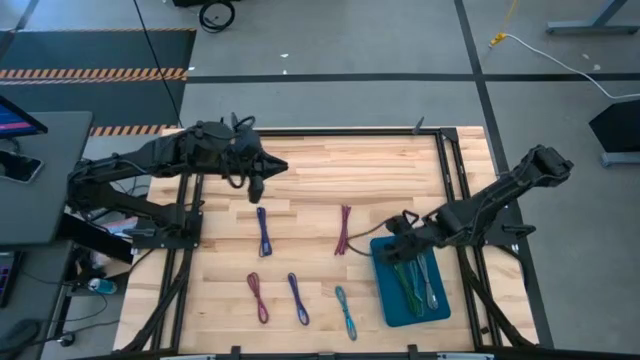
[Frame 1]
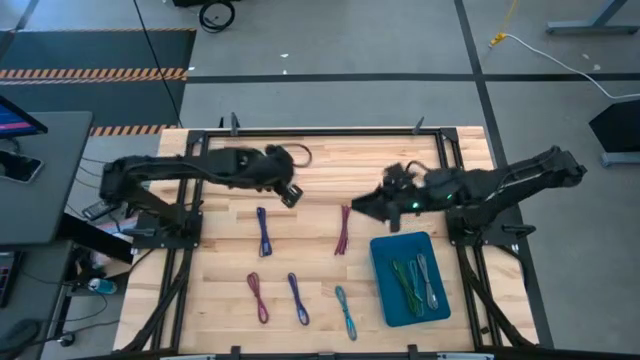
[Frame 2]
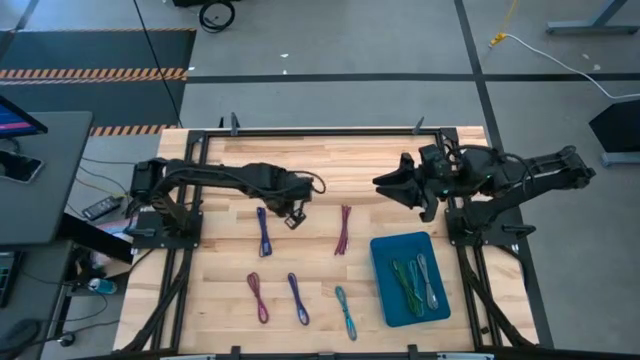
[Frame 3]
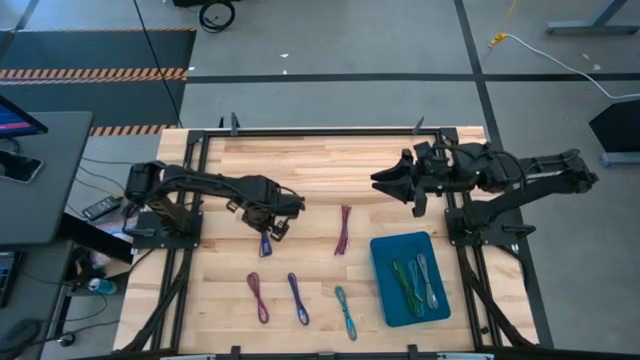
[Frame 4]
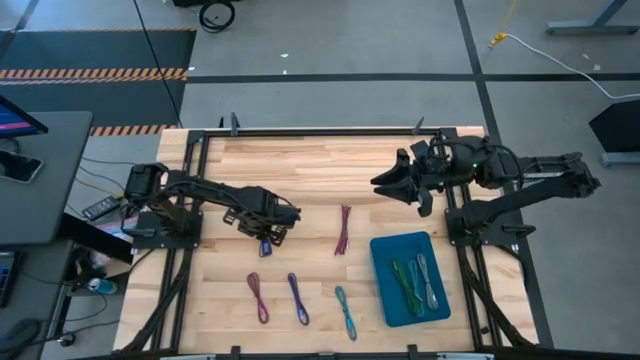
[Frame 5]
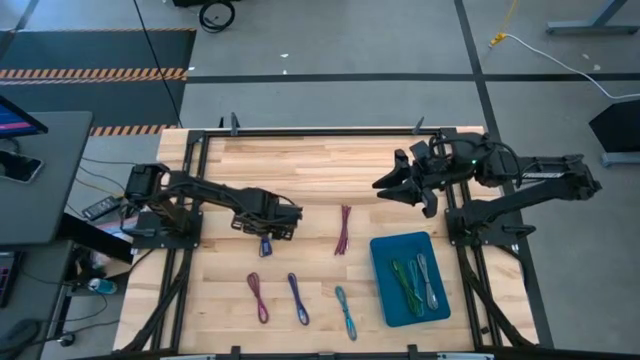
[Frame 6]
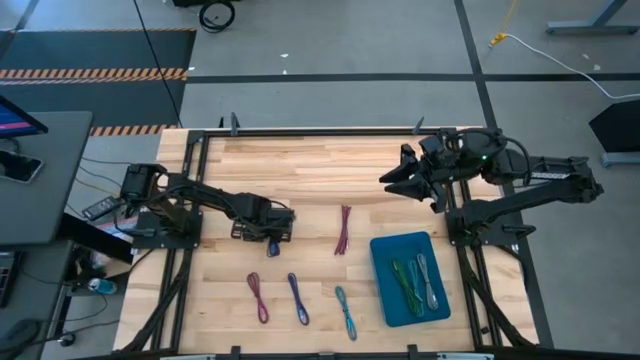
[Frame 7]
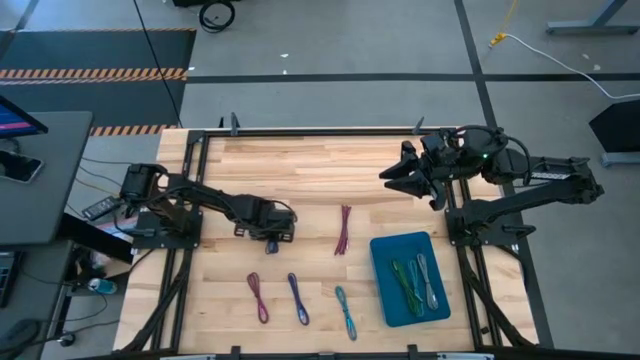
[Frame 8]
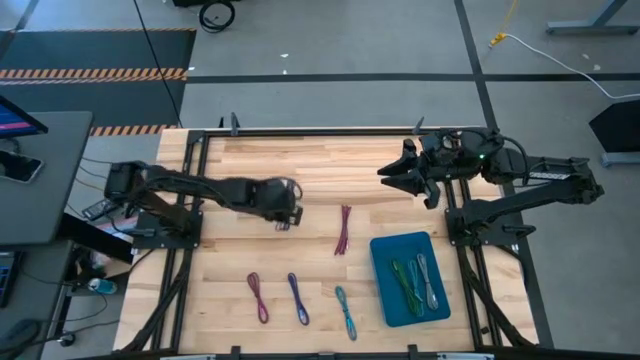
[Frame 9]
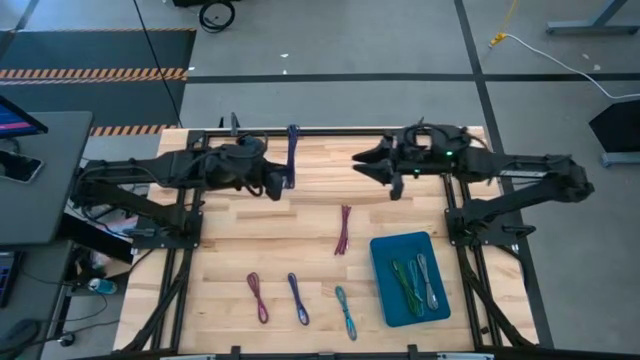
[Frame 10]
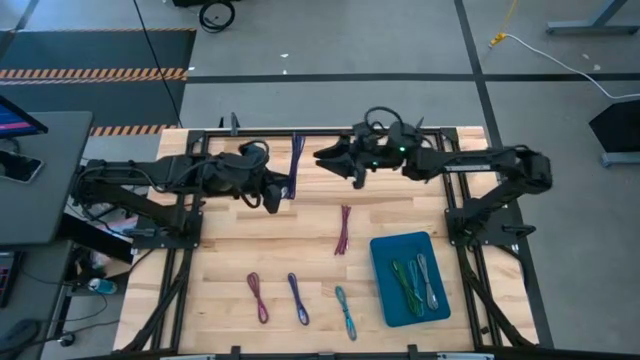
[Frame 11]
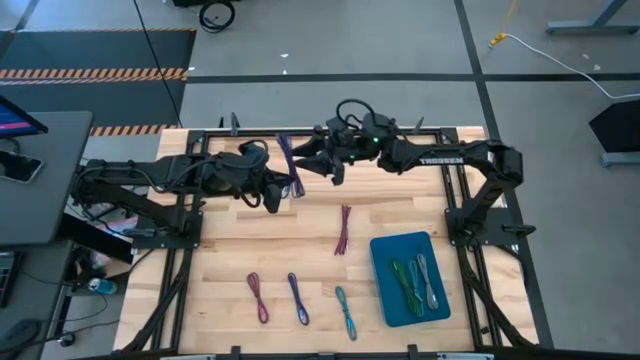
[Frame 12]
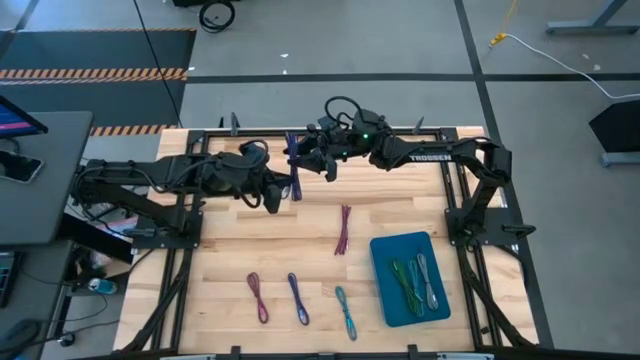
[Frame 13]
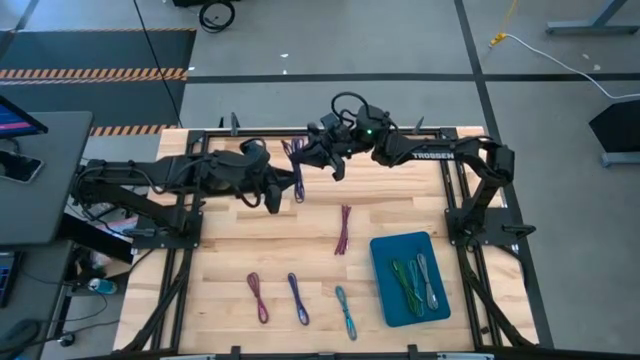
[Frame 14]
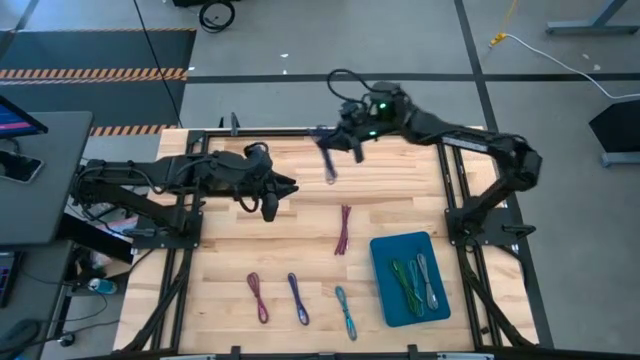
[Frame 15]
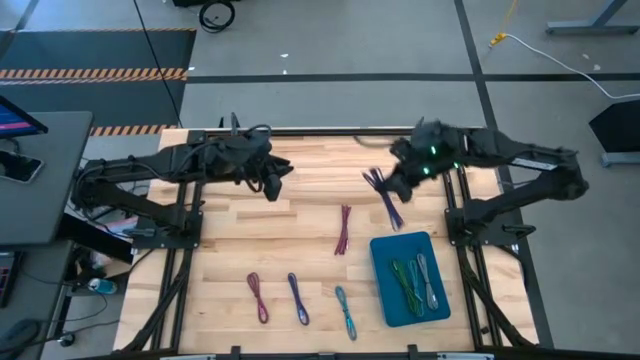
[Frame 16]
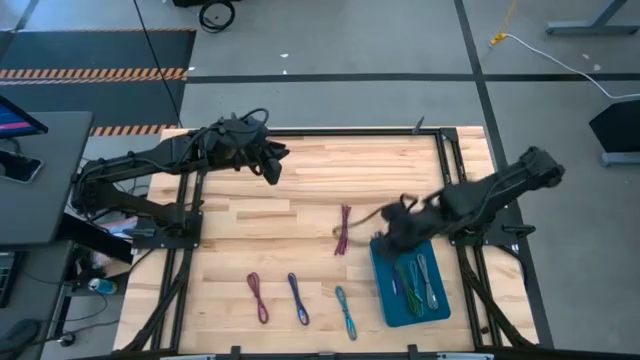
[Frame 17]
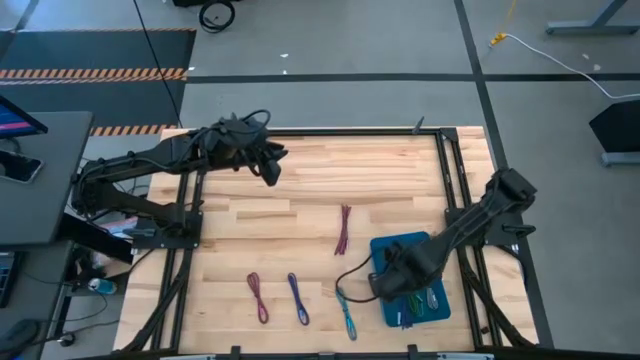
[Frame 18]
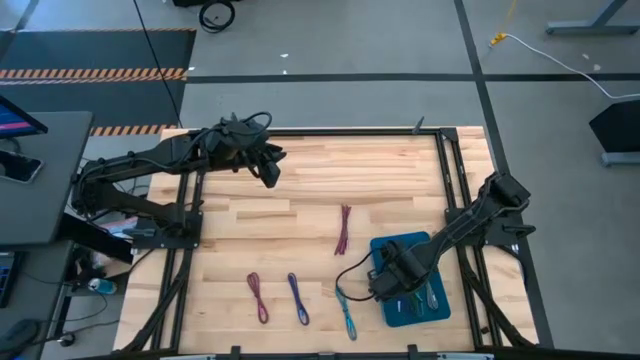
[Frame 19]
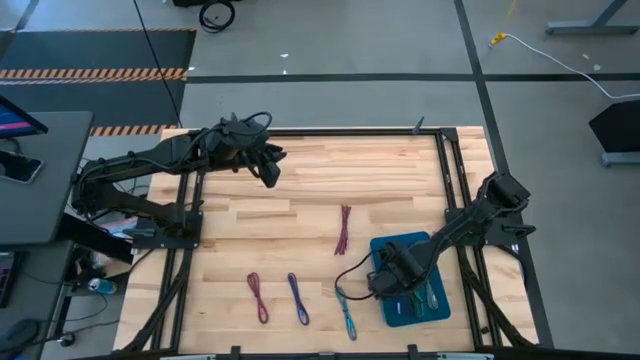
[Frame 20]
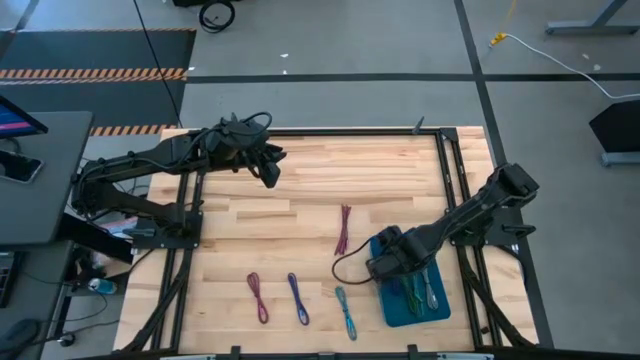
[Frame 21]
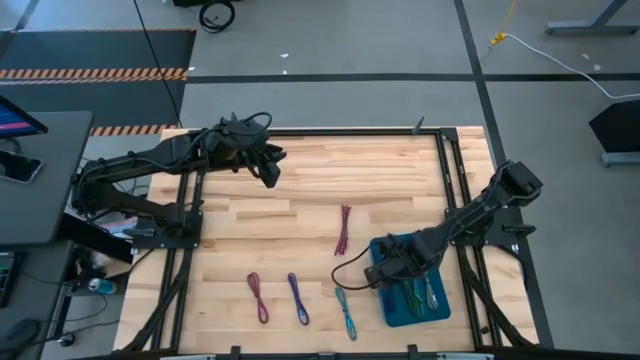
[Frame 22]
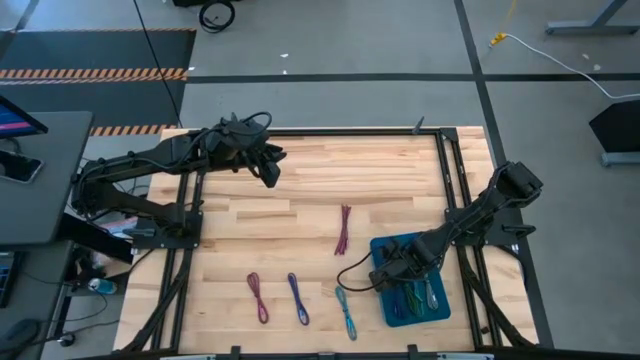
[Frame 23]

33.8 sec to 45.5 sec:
Task: Pick and place USB-C Cables
Put the top violet charger cable into the blue bin

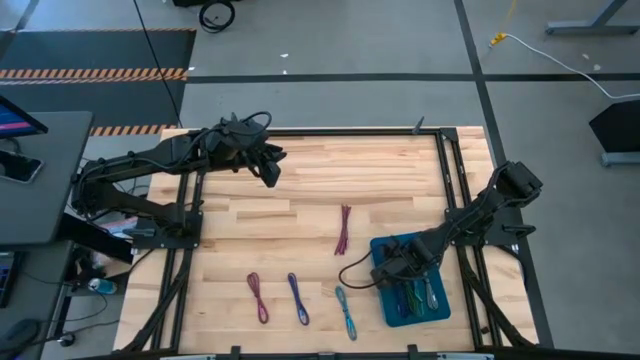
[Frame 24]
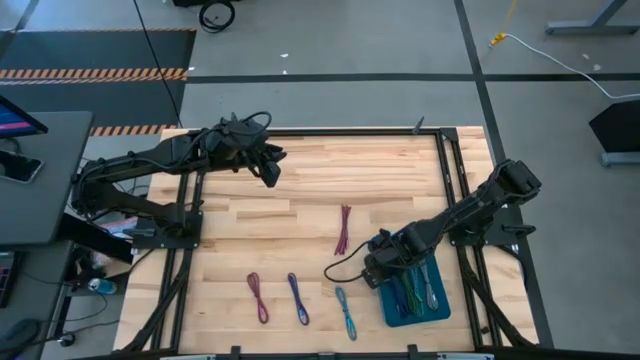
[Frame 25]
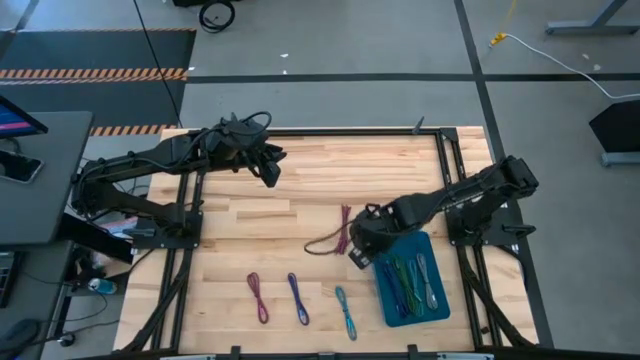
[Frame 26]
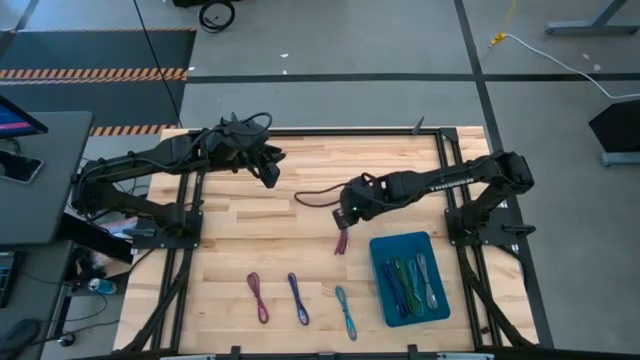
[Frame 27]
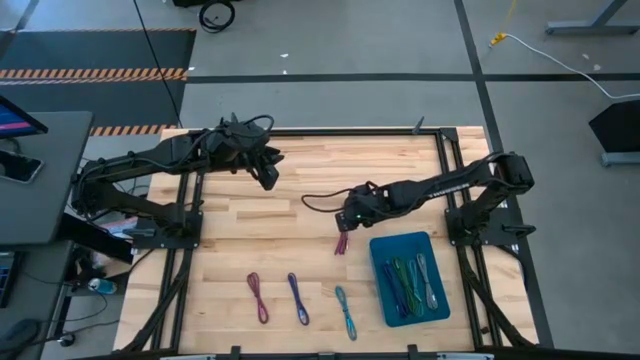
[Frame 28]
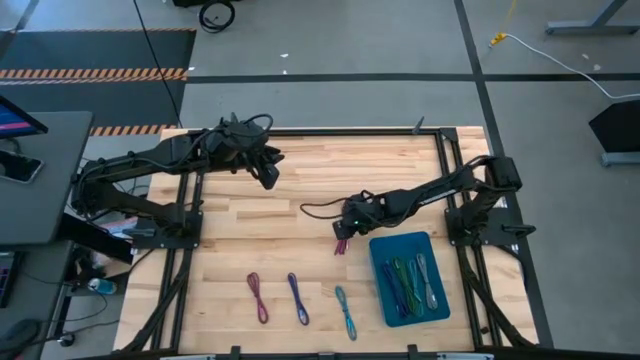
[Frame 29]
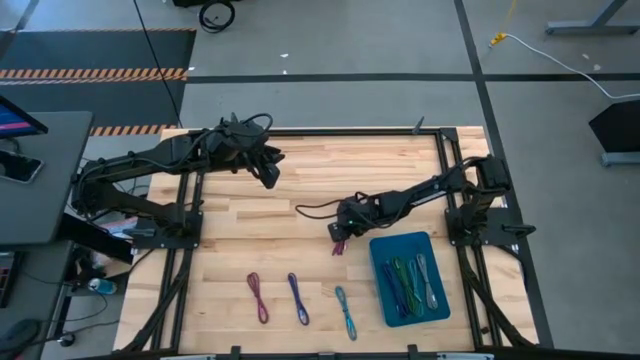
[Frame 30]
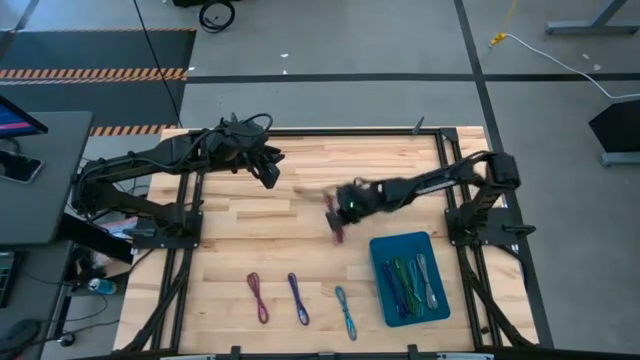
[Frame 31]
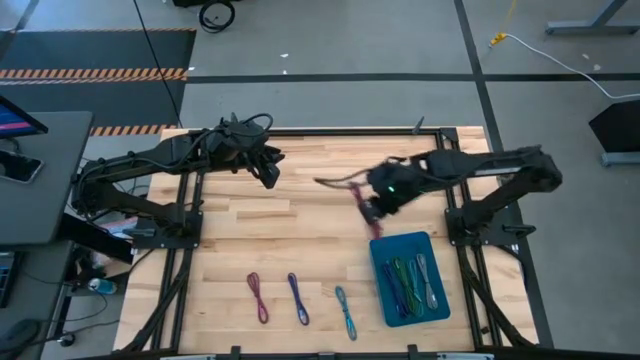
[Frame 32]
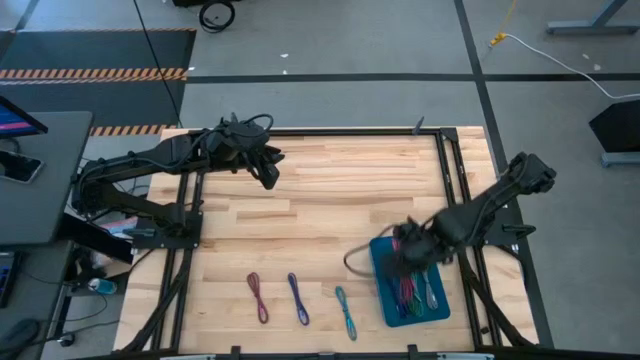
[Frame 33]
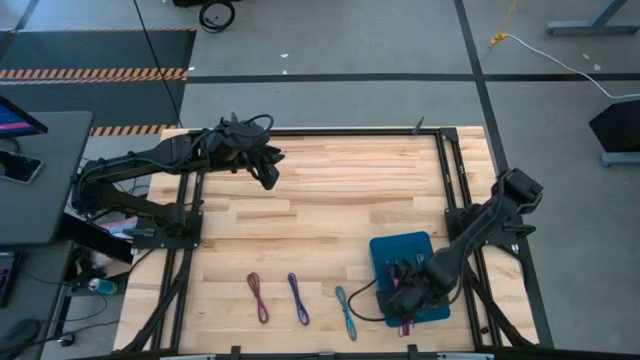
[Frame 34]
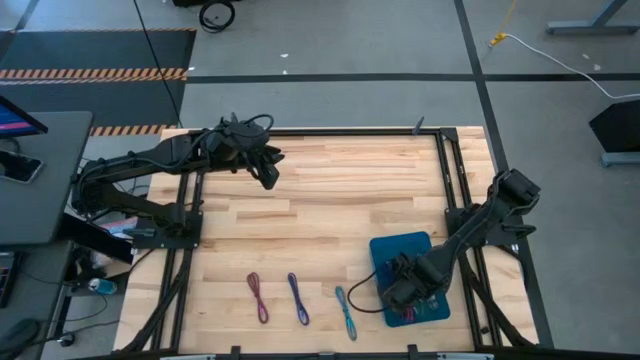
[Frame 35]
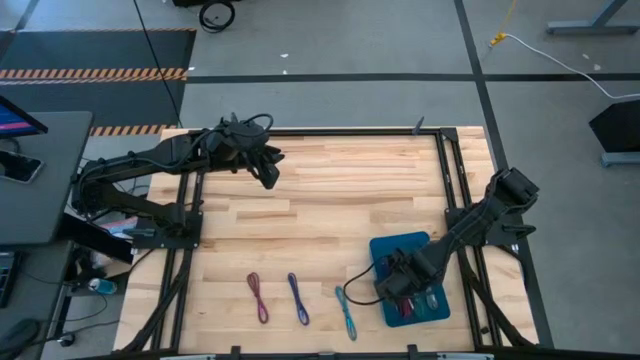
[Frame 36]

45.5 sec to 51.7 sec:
Put the top pink charger cable into the blue bin
